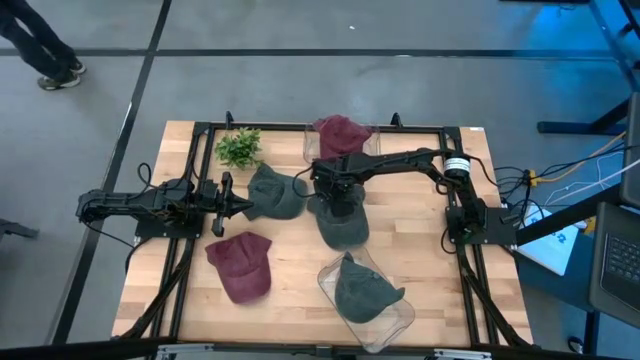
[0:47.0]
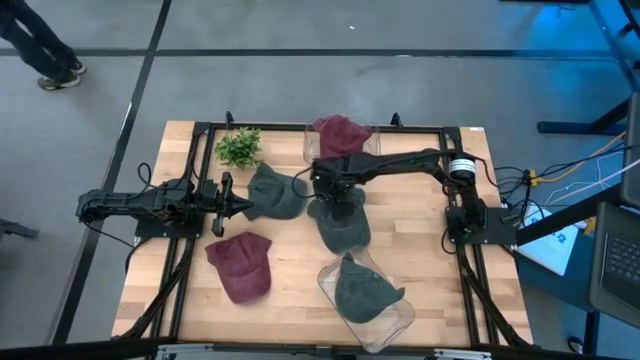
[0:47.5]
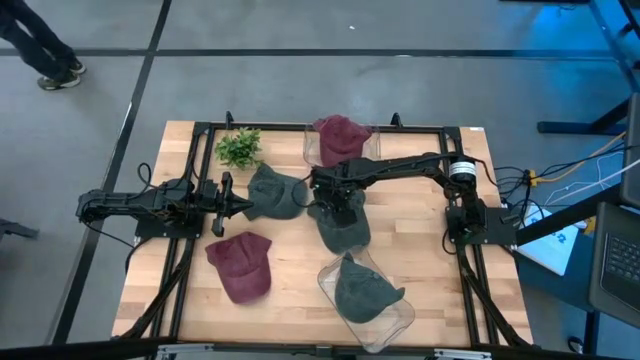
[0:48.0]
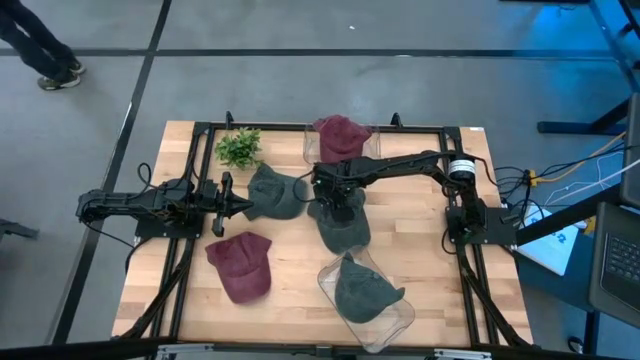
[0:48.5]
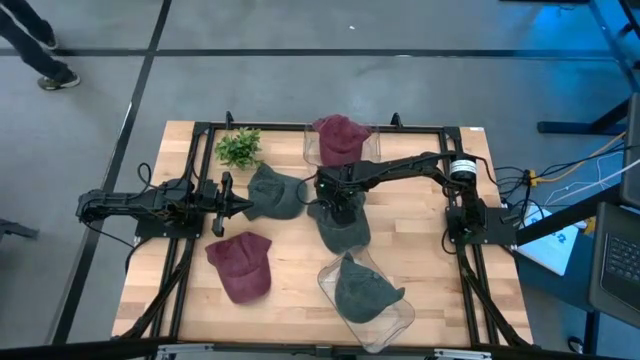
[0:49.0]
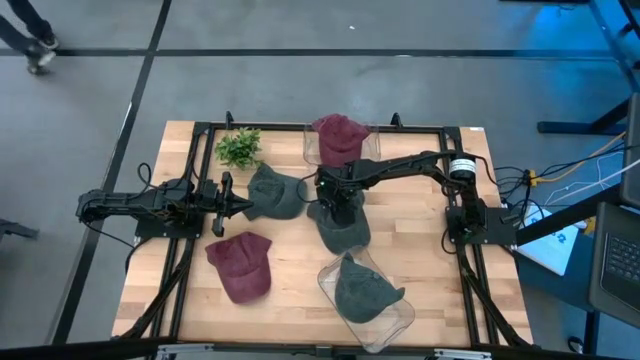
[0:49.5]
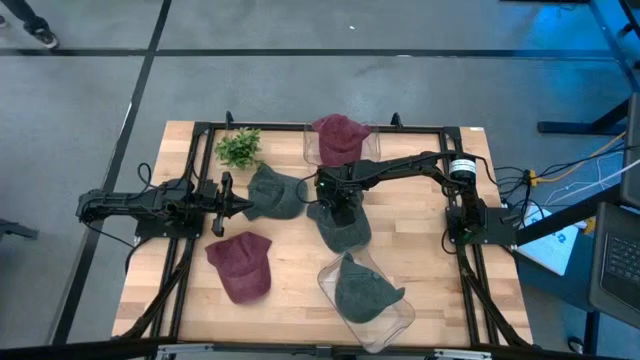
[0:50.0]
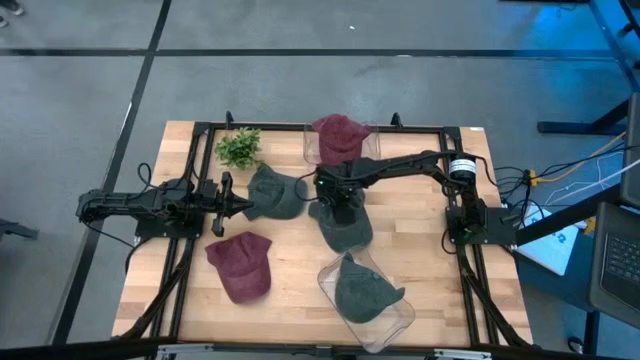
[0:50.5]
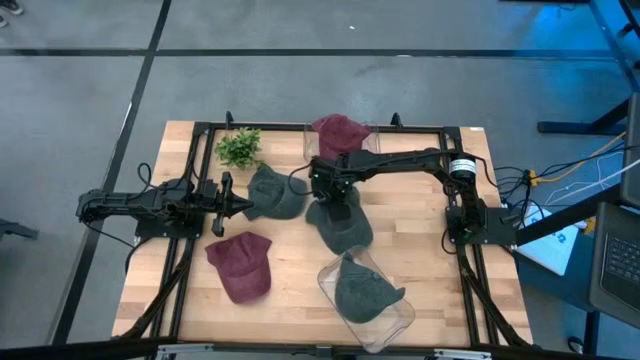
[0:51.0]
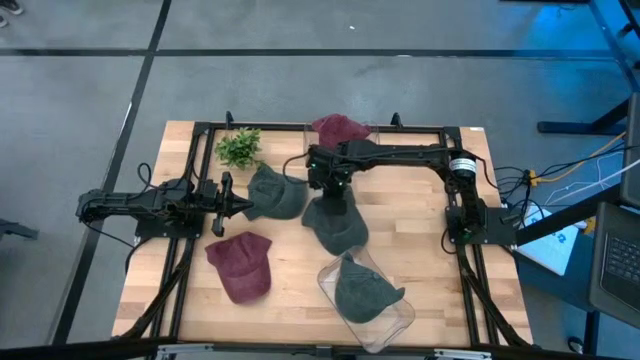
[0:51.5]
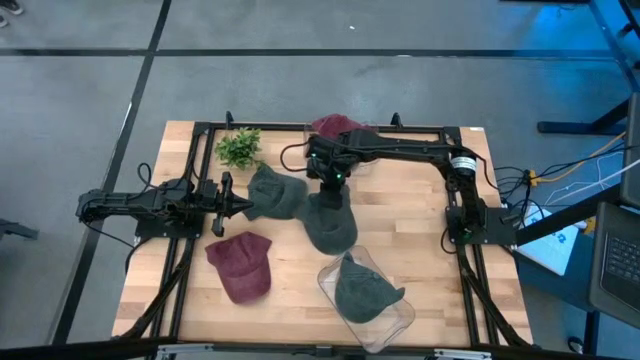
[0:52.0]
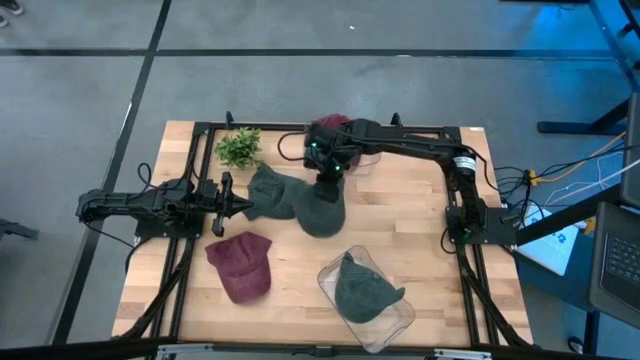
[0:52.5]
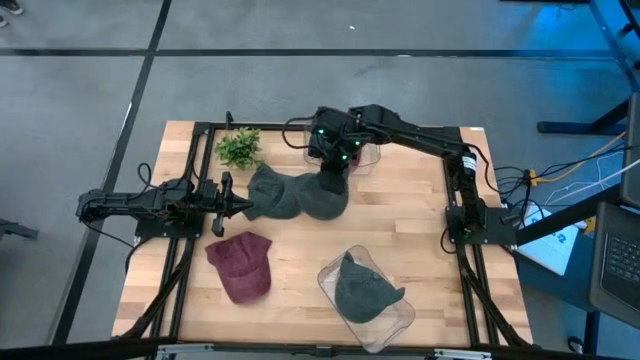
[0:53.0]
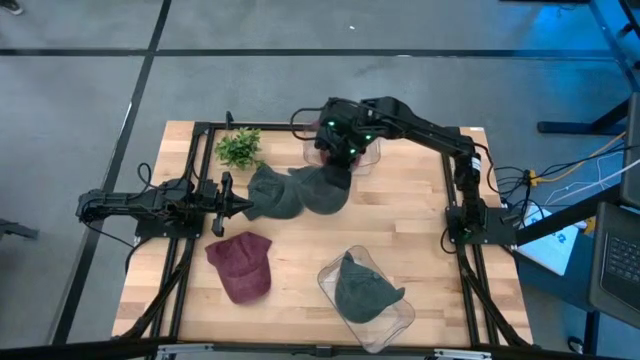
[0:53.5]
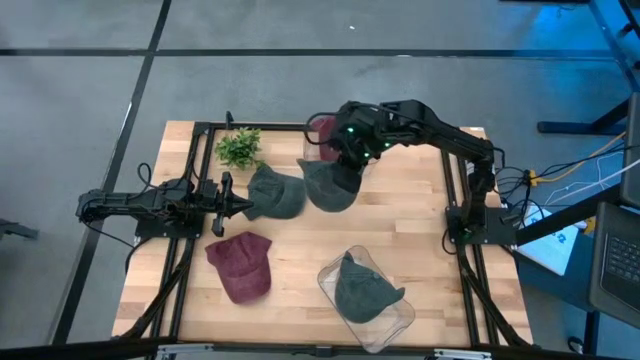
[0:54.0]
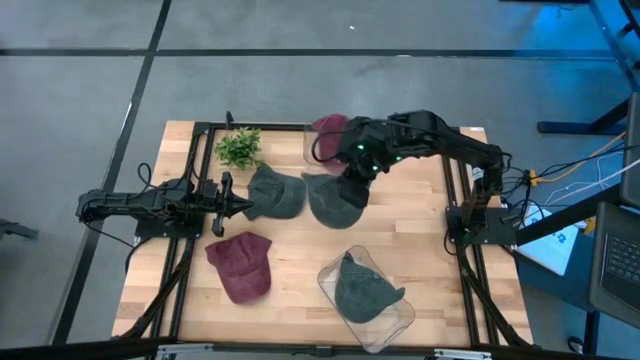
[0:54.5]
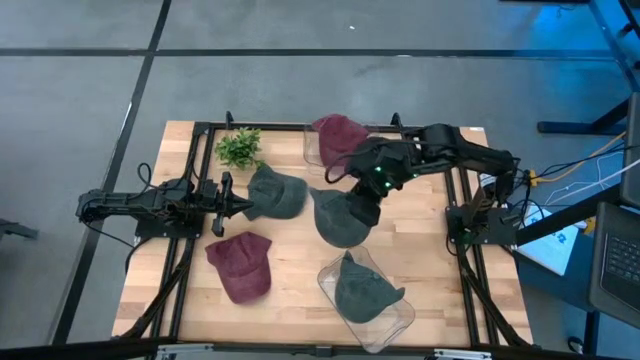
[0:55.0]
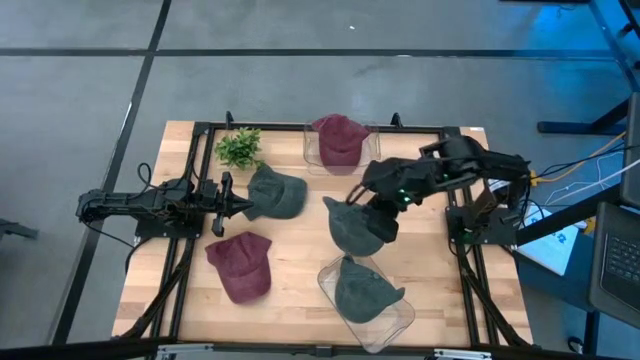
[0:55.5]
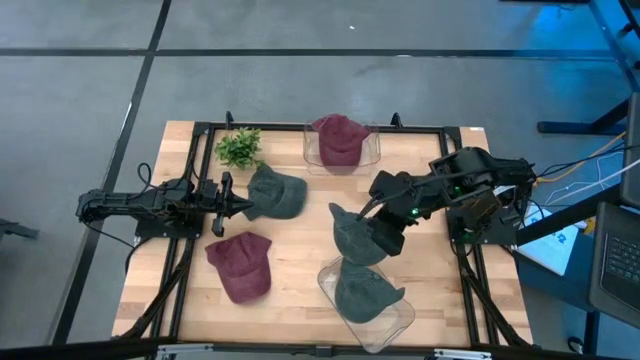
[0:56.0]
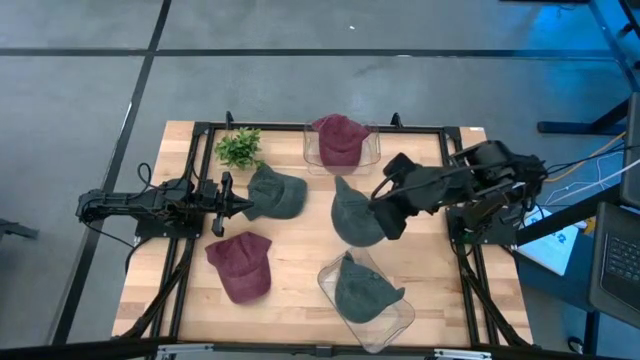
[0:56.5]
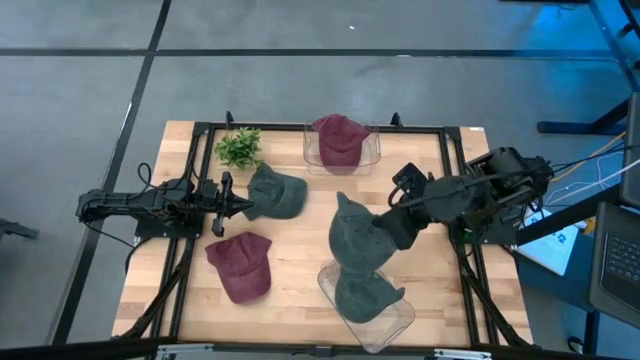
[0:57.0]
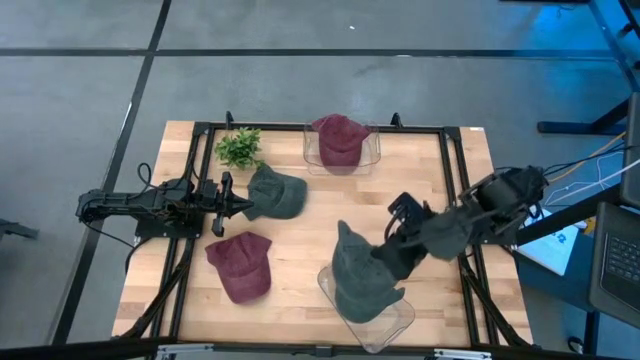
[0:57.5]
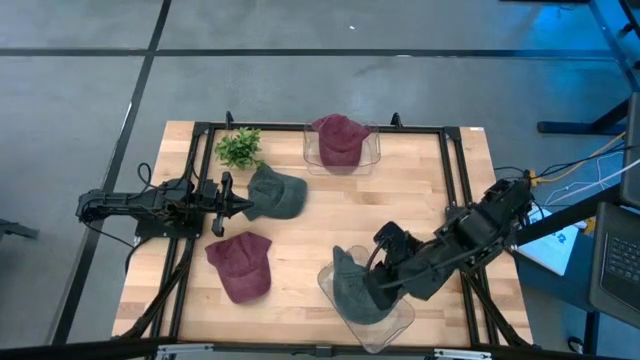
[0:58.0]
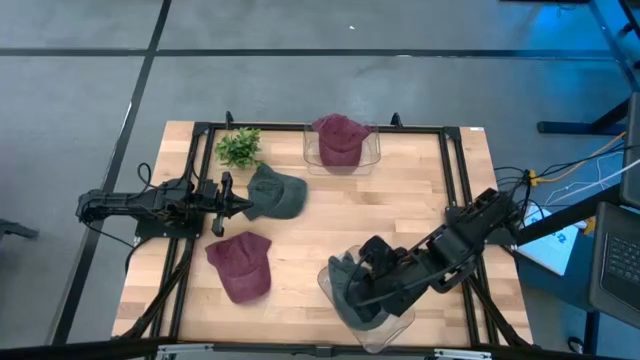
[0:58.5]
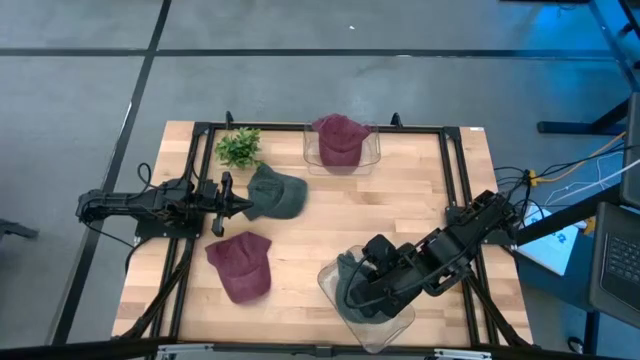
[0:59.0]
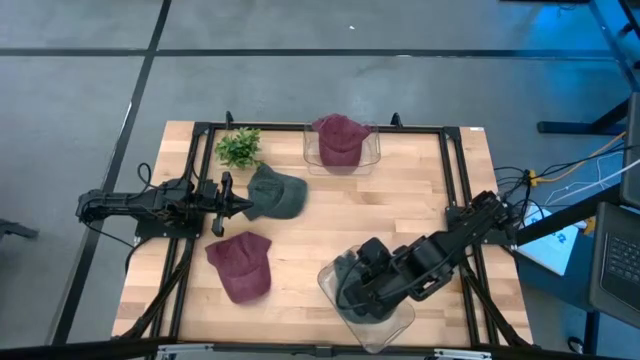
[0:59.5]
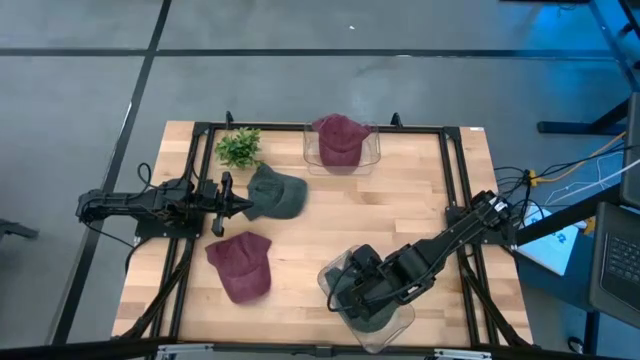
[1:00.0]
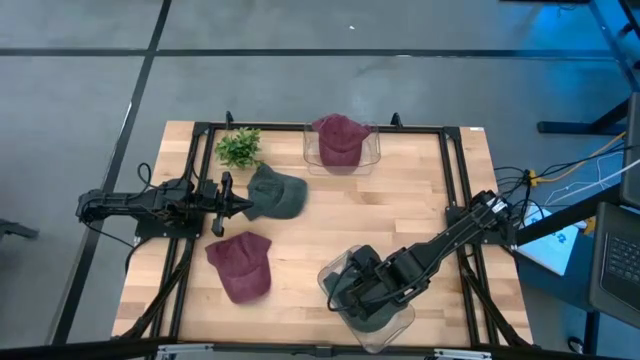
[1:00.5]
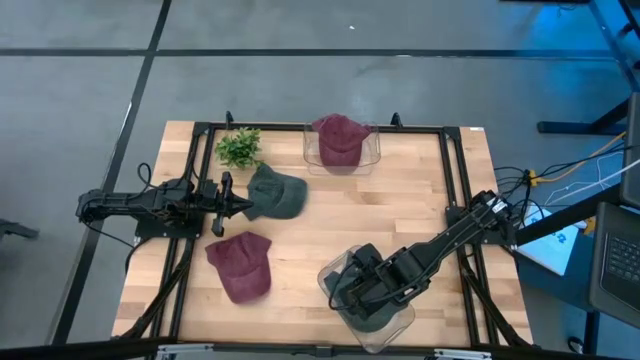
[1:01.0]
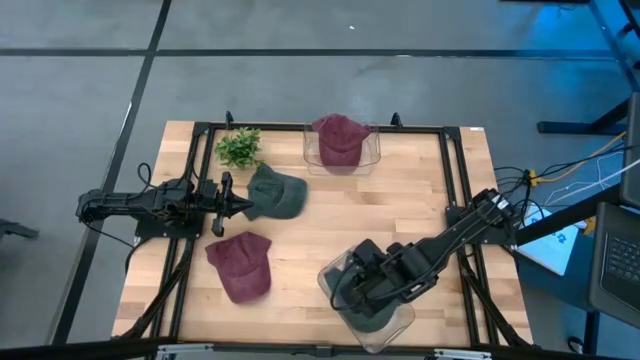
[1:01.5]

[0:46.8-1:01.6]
Task: Pick & Place hat
Put the right black cap into the bottom transparent bin

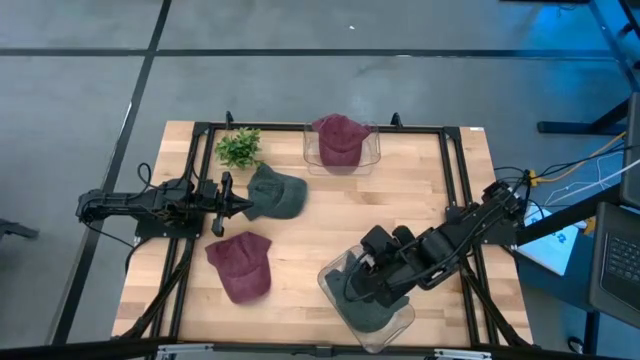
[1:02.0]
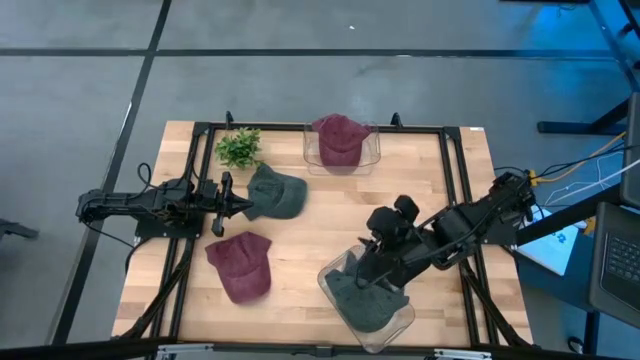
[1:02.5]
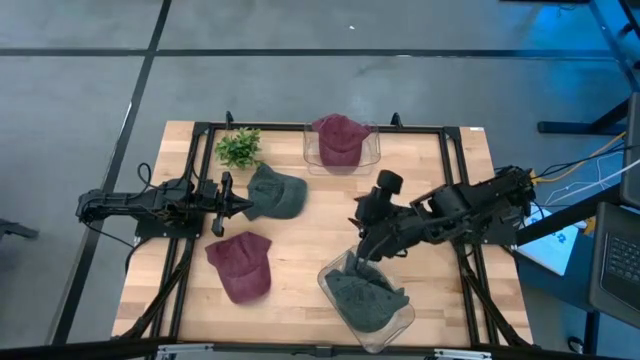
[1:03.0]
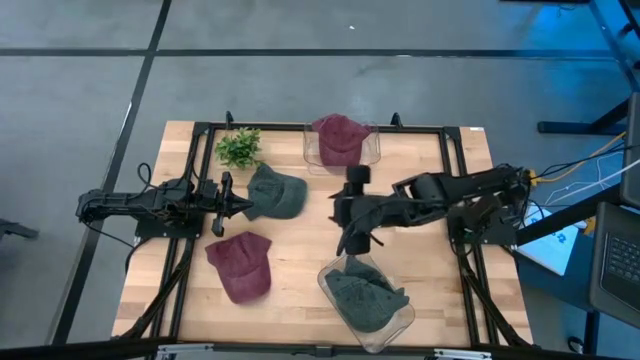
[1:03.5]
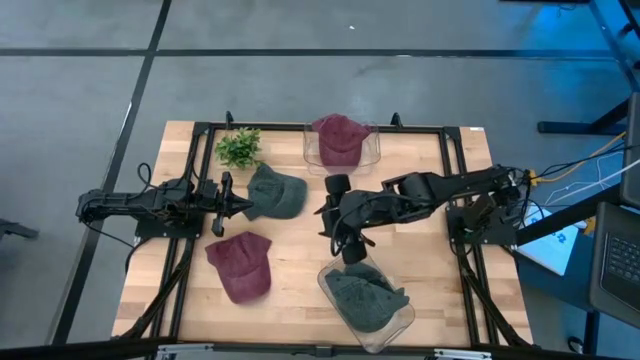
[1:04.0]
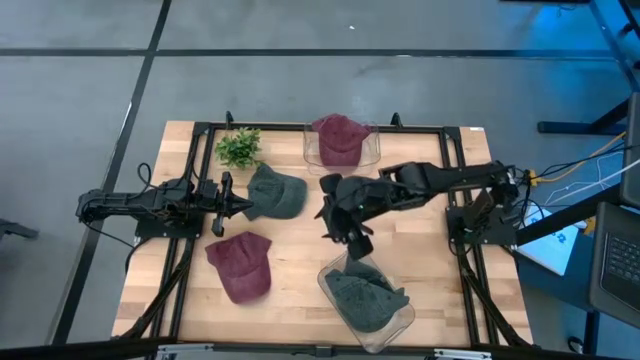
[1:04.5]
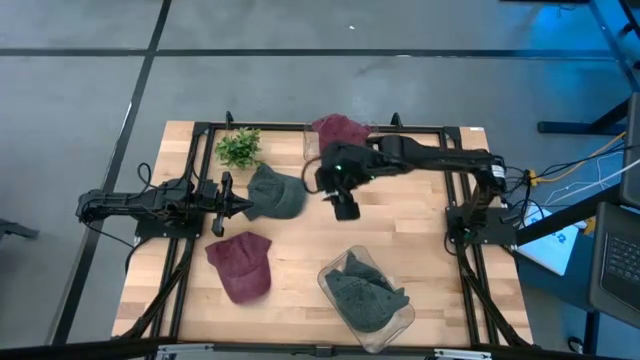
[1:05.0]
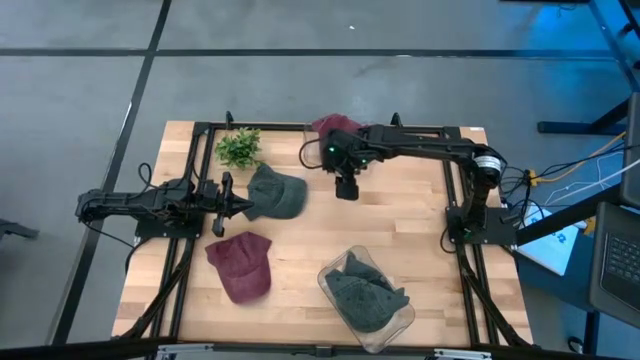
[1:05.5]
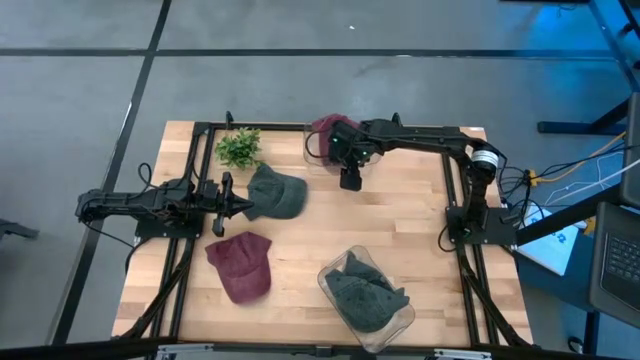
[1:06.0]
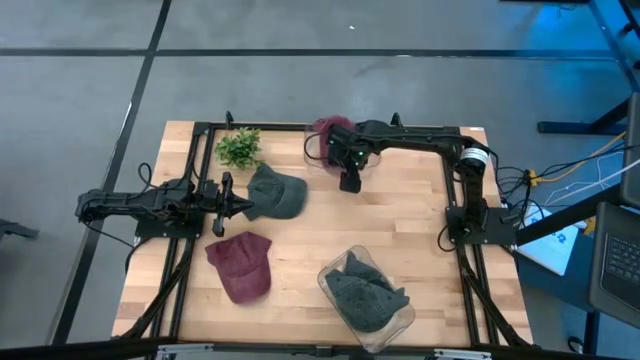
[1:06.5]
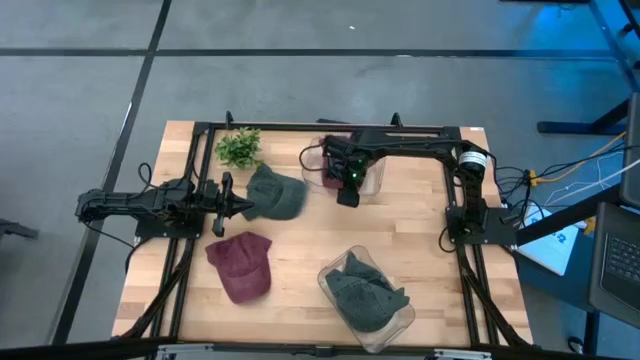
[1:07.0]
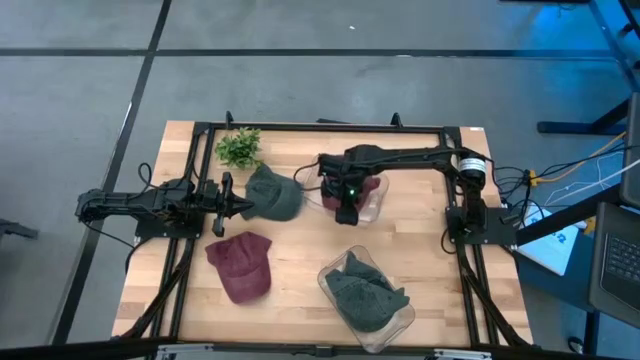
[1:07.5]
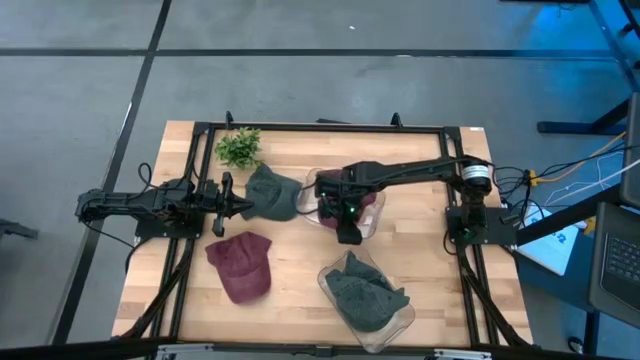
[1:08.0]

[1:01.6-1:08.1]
Move the top transparent bin to the center of the table
